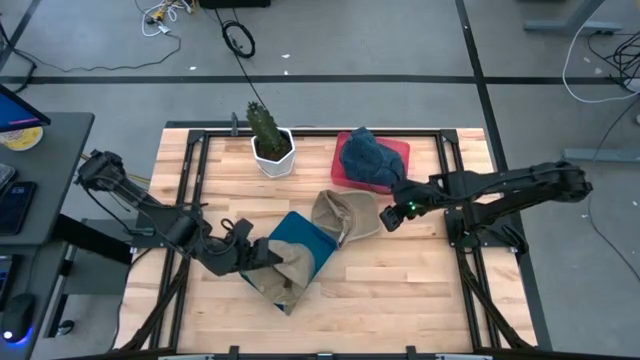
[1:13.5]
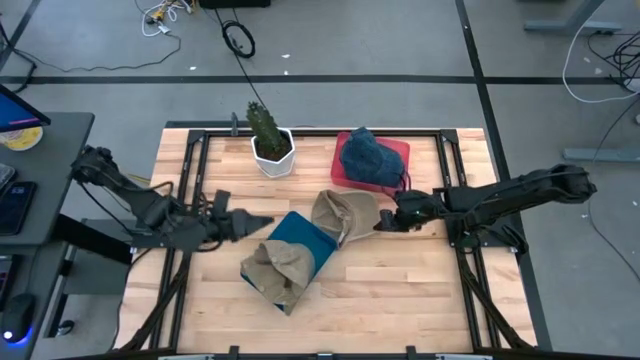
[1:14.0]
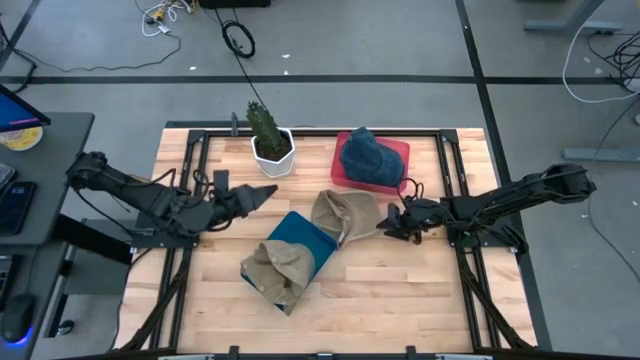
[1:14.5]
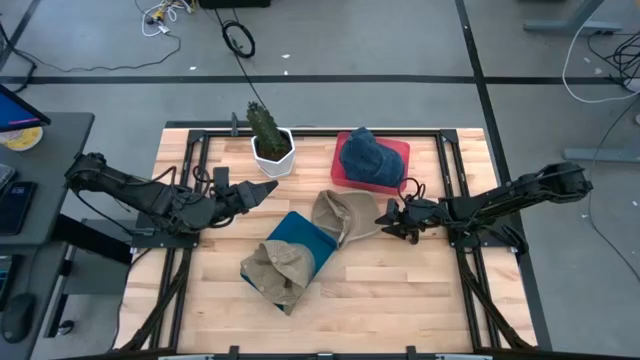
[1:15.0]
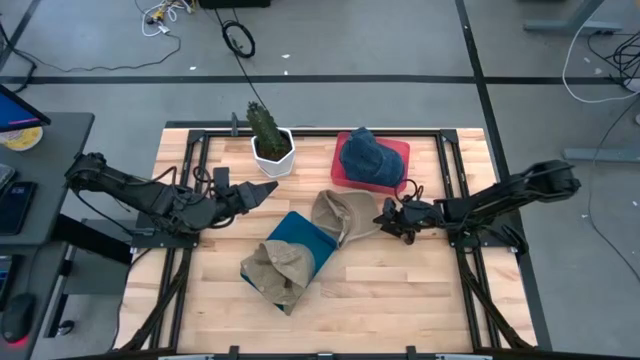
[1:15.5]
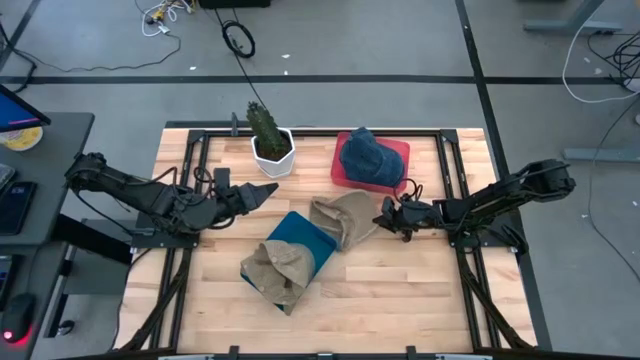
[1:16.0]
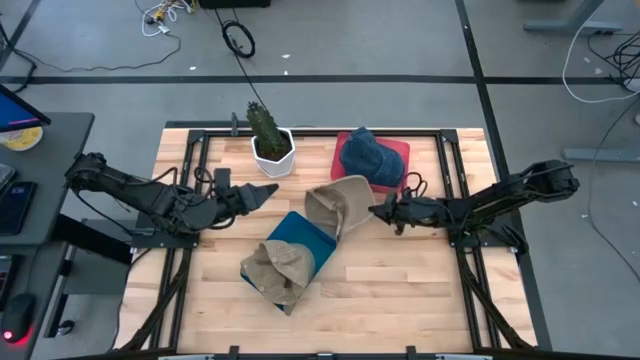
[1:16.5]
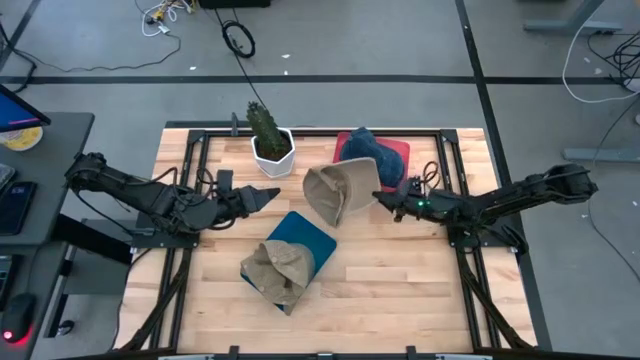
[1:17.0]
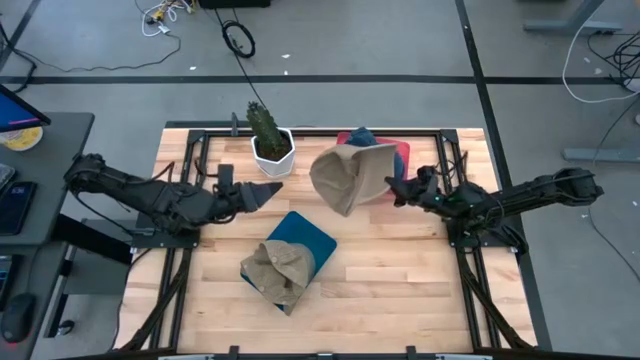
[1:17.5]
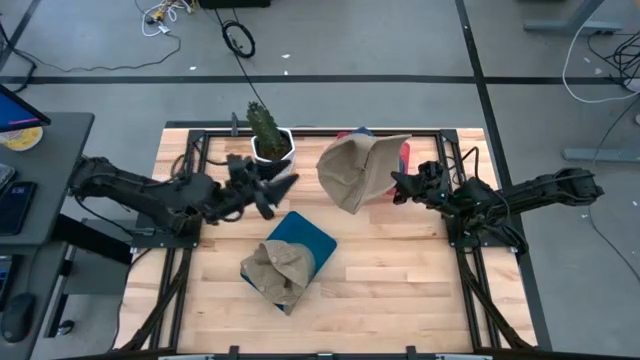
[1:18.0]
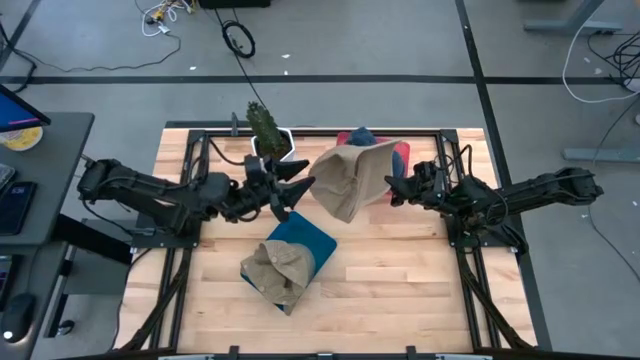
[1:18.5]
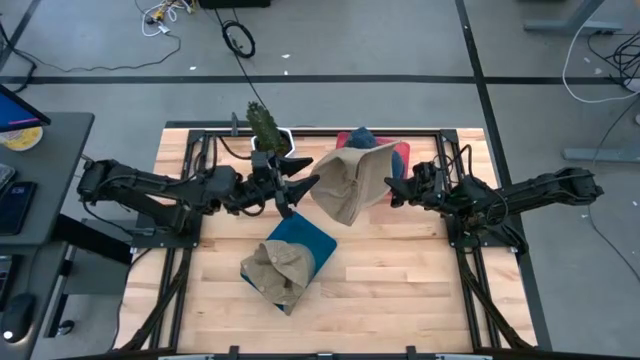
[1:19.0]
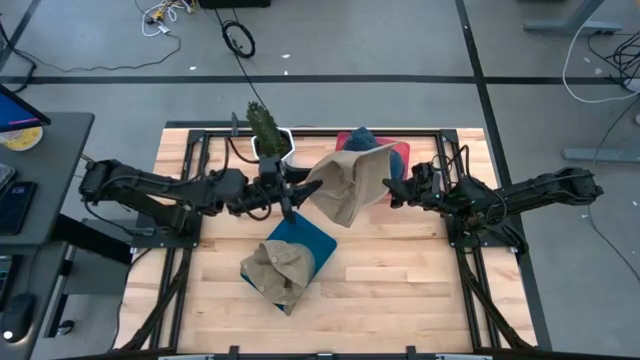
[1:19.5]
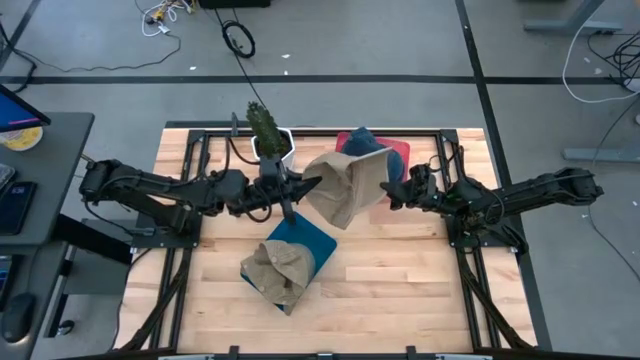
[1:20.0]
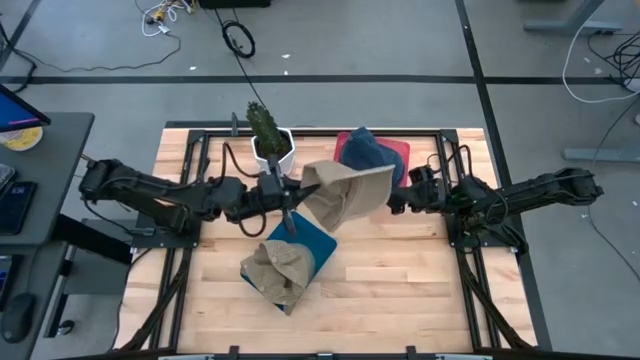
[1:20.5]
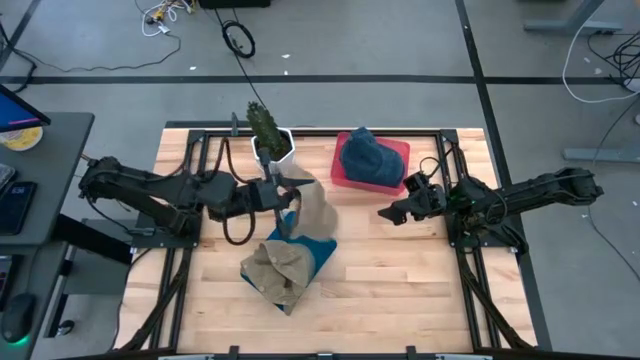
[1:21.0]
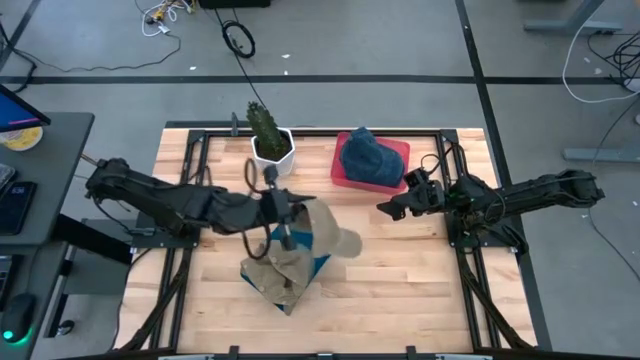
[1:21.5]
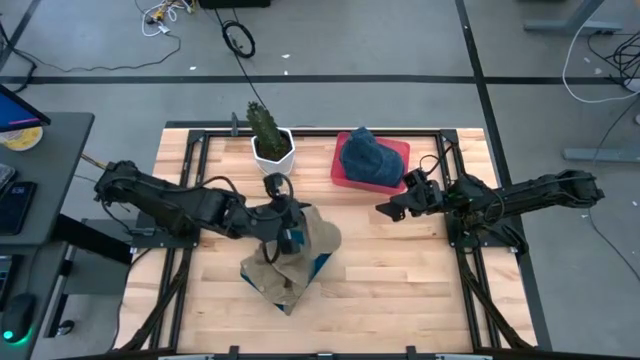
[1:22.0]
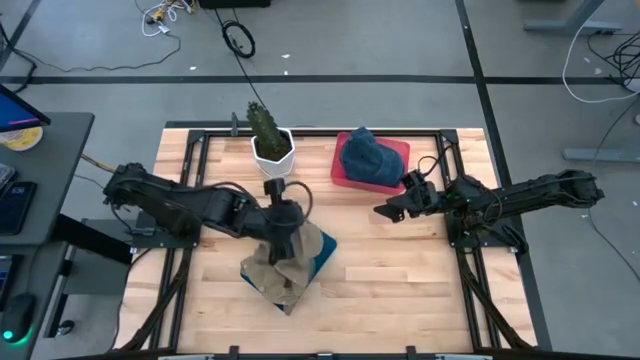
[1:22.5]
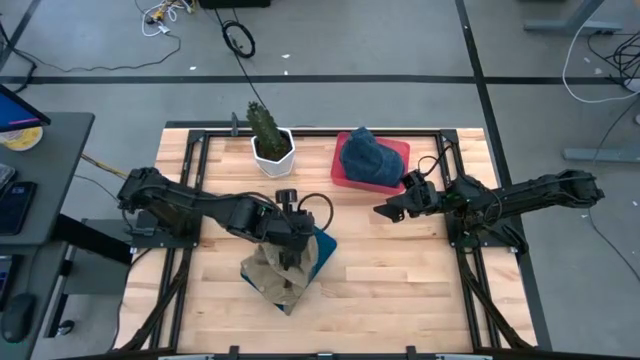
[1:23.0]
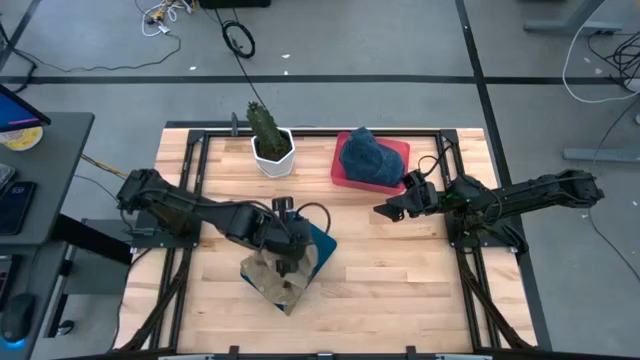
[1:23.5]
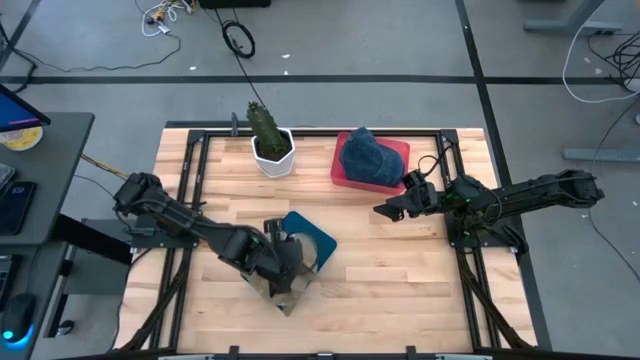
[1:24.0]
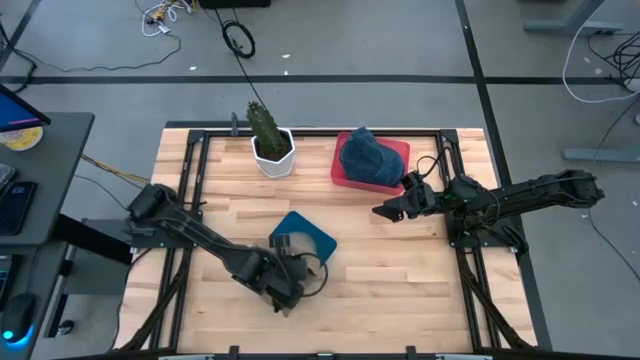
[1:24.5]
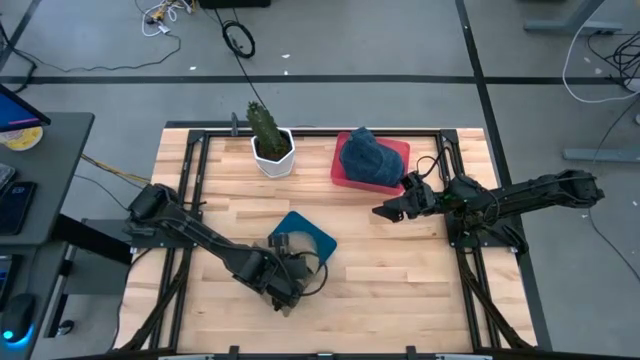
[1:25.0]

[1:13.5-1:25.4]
Task: Pick & Place hat
Put the brown cap into the blue bin
